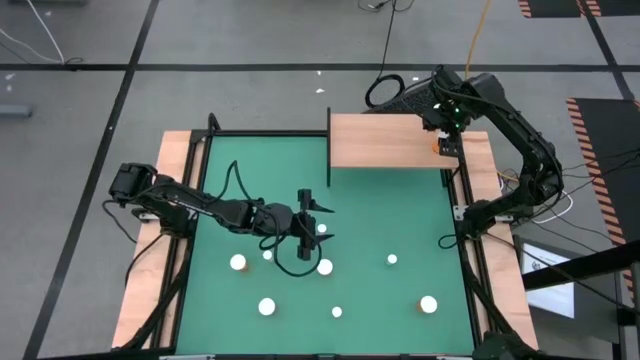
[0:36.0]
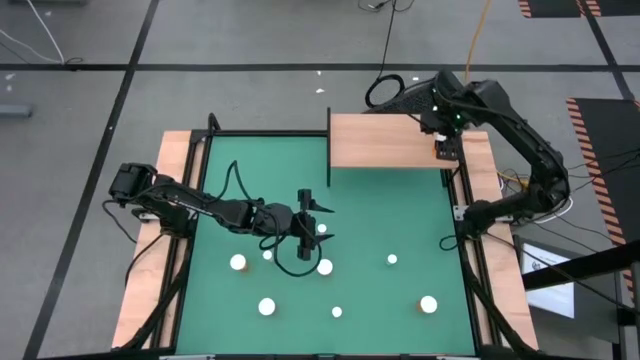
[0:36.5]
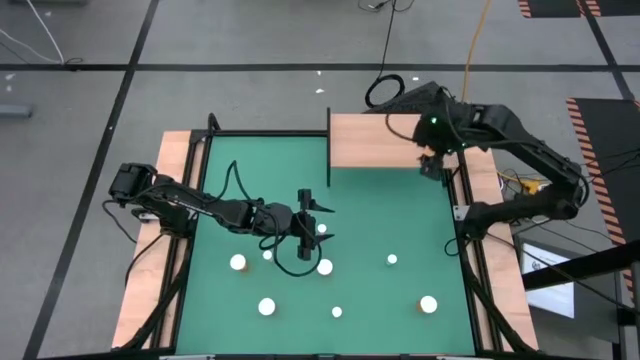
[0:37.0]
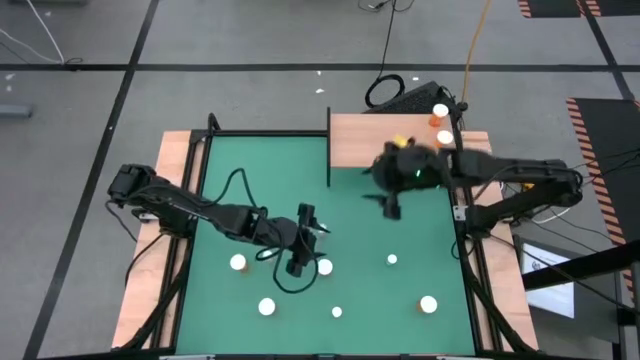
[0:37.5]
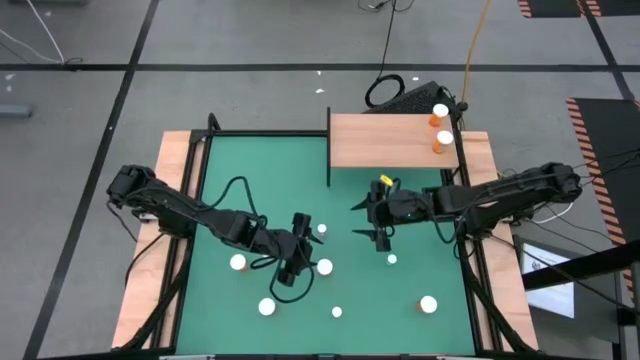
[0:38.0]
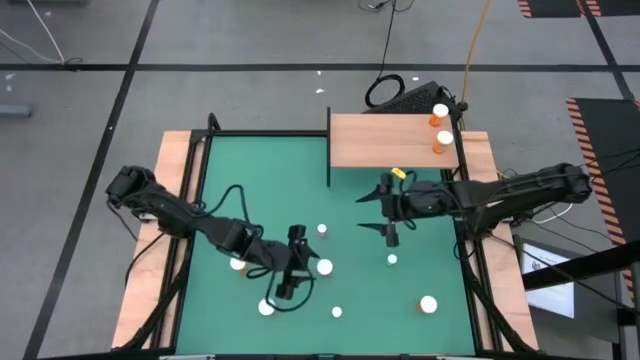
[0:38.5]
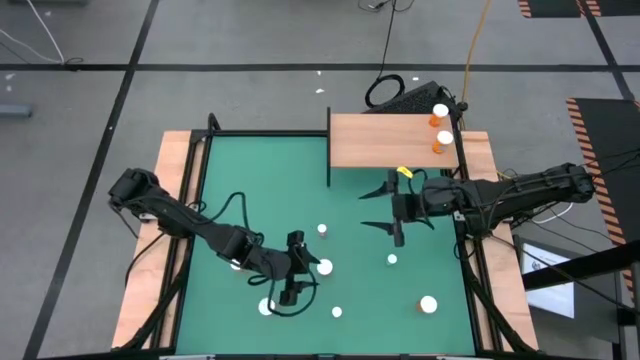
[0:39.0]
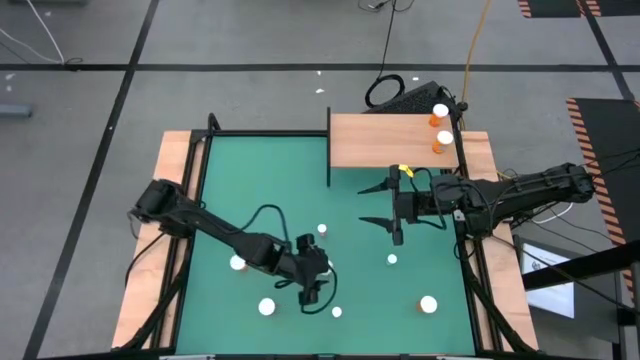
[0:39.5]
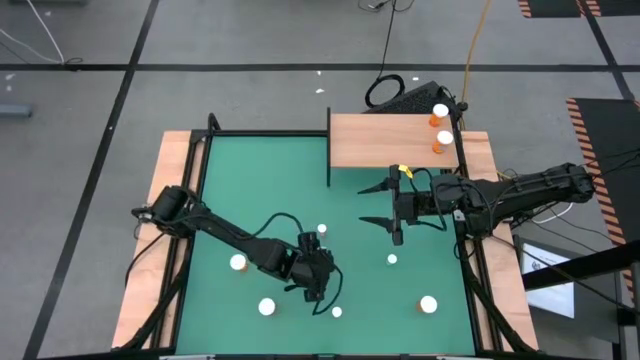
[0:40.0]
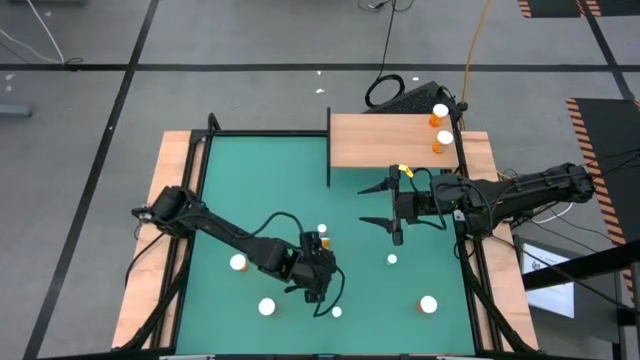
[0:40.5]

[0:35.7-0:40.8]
Task: Pick and place medicine bottles onto shelf by color
Put the orange pill bottle on the shelf

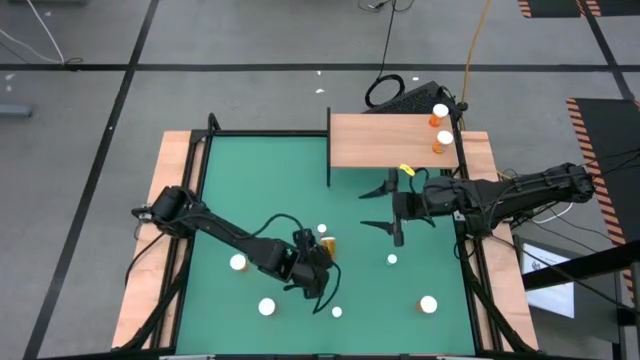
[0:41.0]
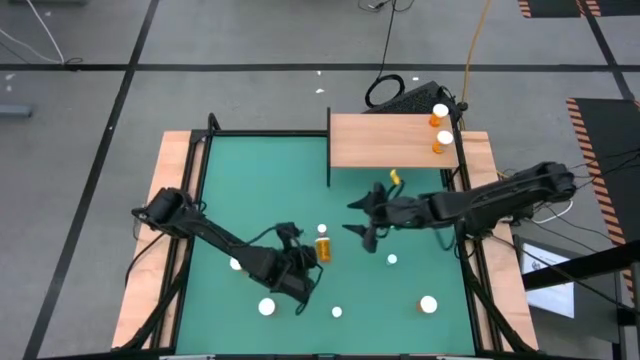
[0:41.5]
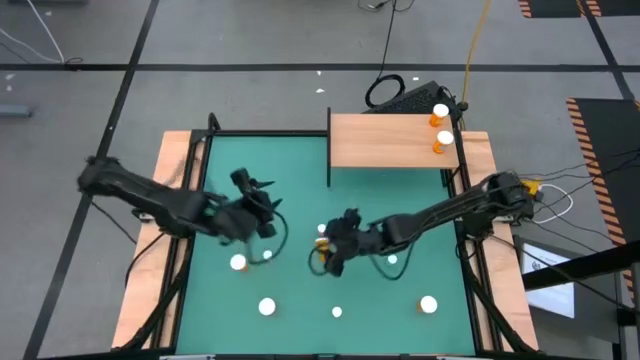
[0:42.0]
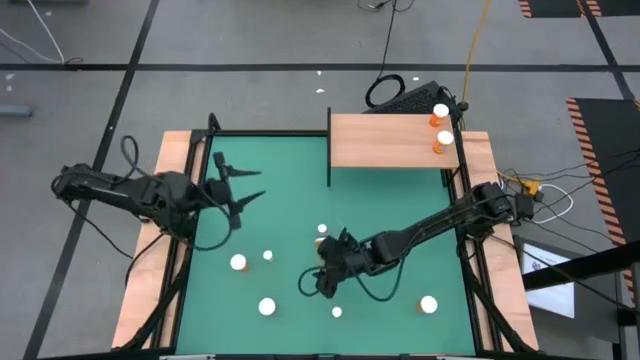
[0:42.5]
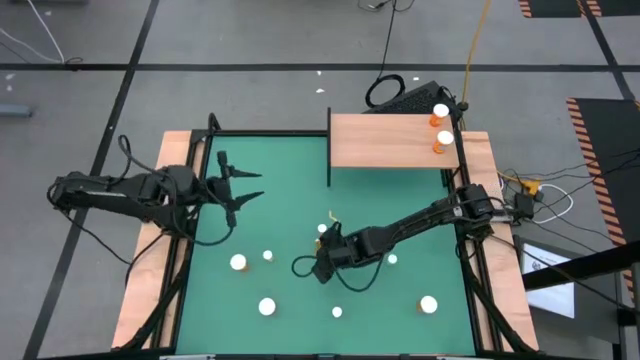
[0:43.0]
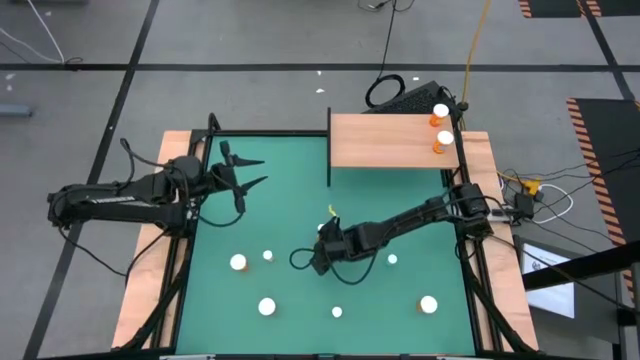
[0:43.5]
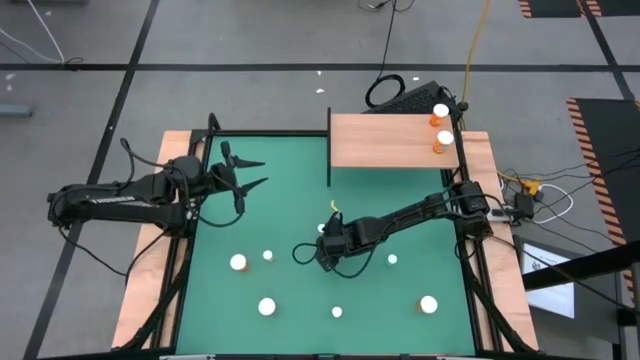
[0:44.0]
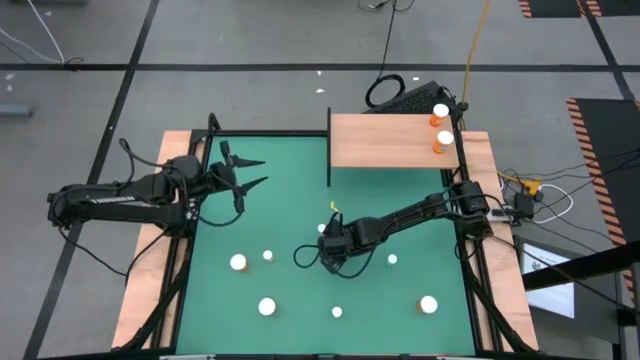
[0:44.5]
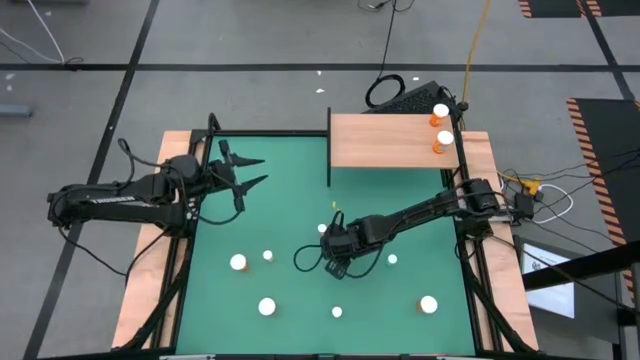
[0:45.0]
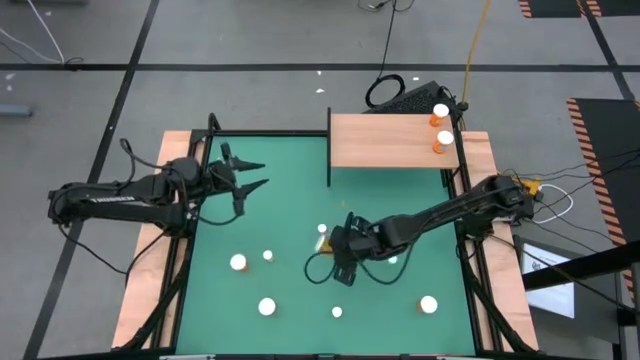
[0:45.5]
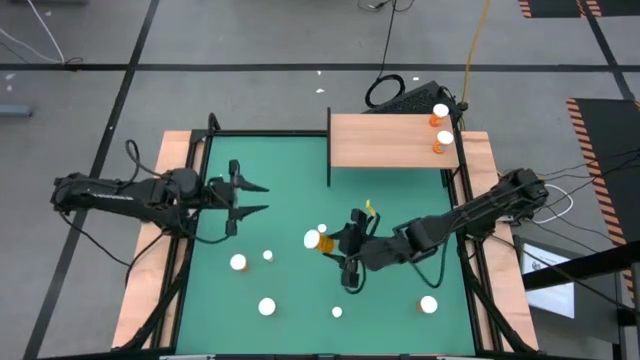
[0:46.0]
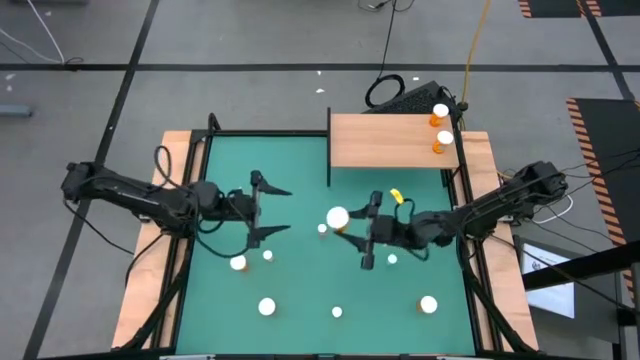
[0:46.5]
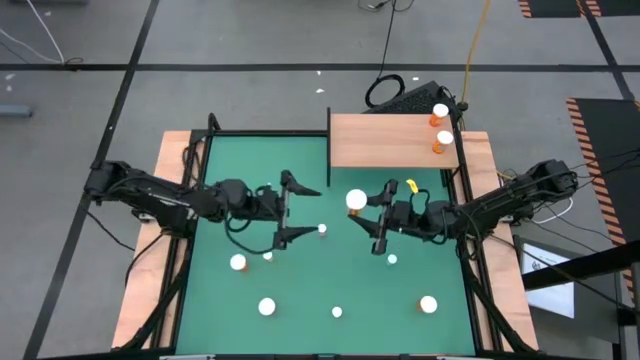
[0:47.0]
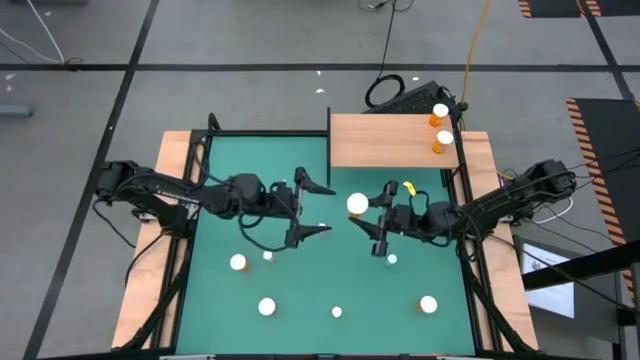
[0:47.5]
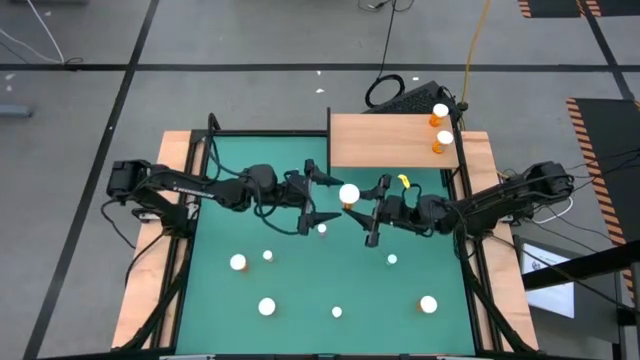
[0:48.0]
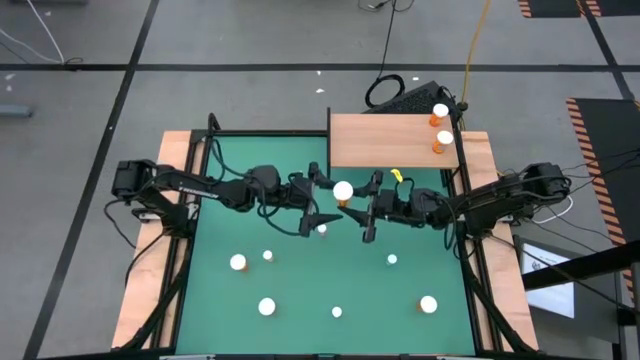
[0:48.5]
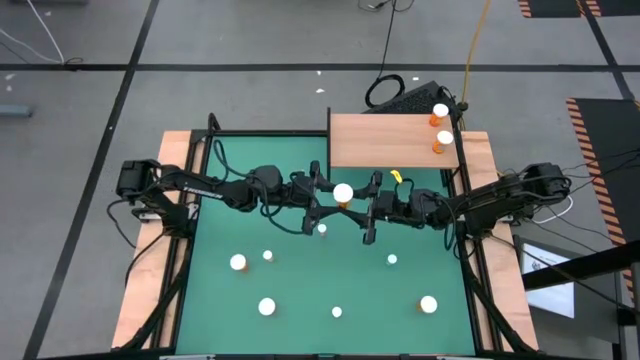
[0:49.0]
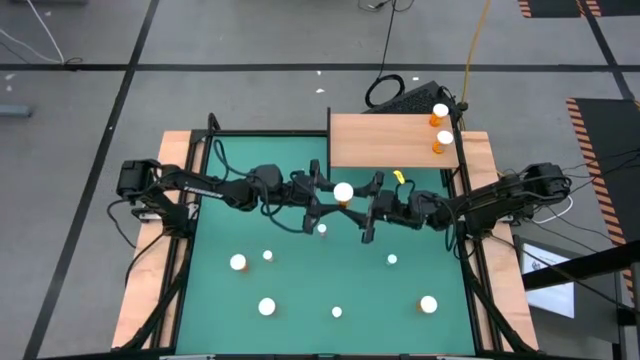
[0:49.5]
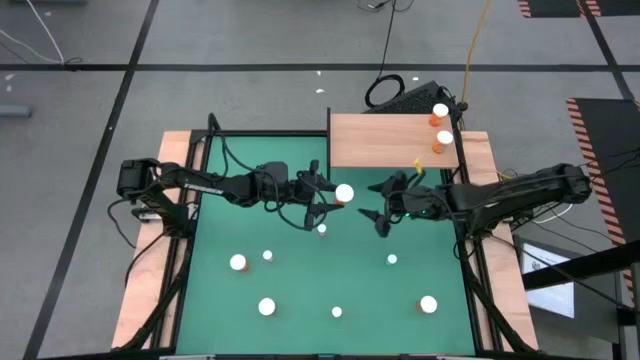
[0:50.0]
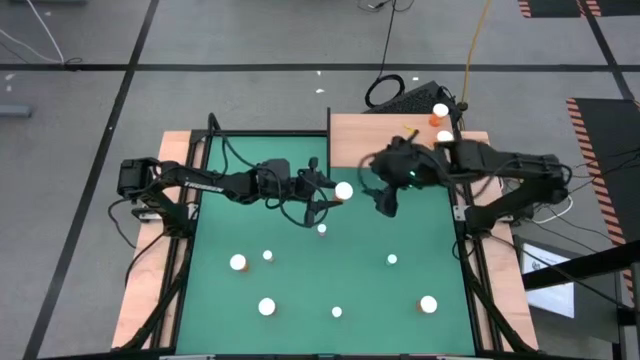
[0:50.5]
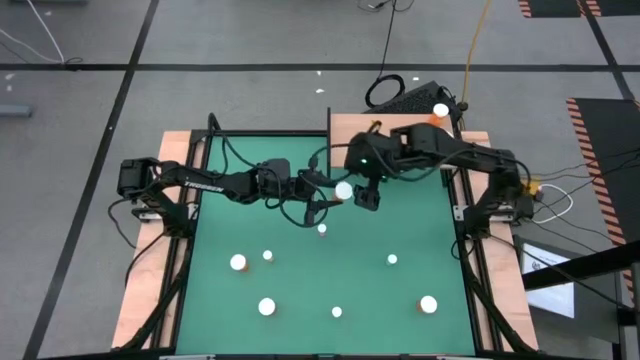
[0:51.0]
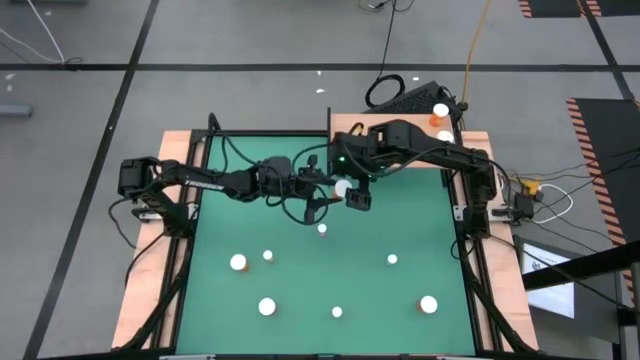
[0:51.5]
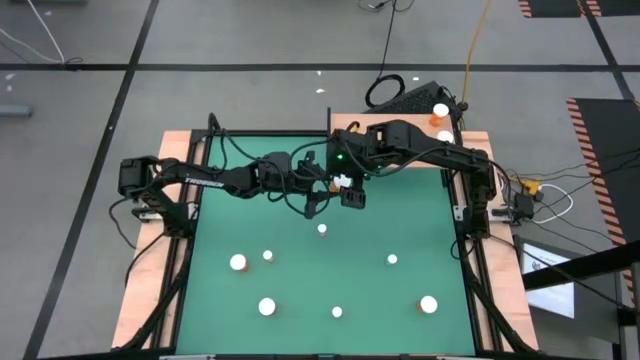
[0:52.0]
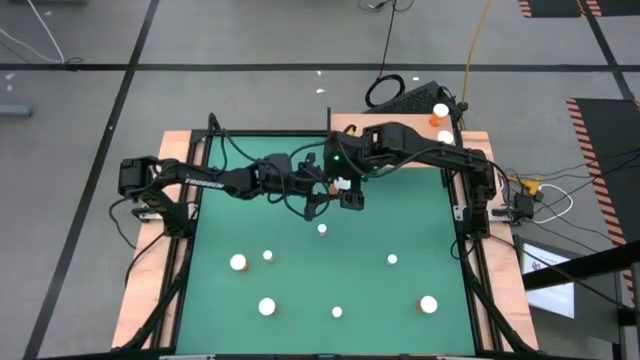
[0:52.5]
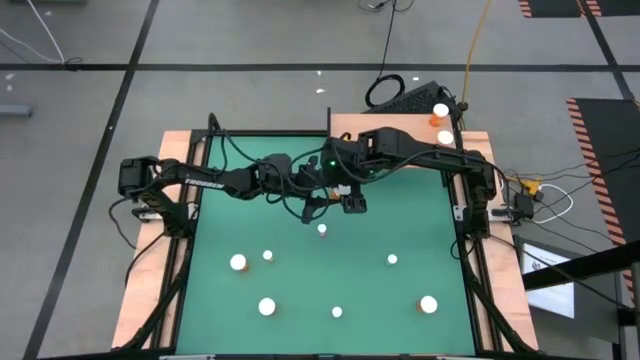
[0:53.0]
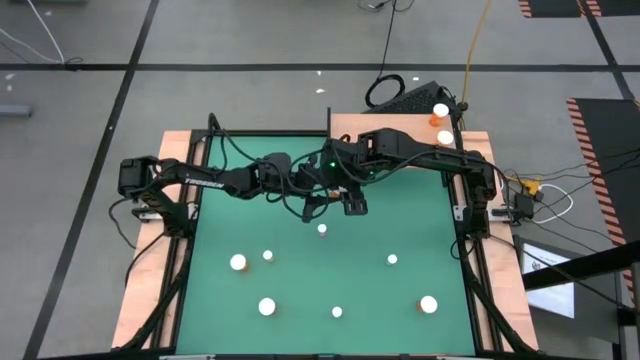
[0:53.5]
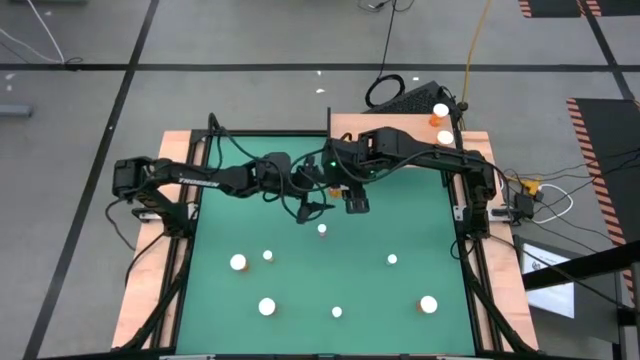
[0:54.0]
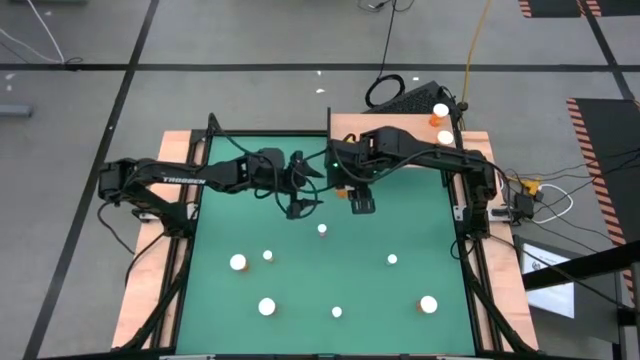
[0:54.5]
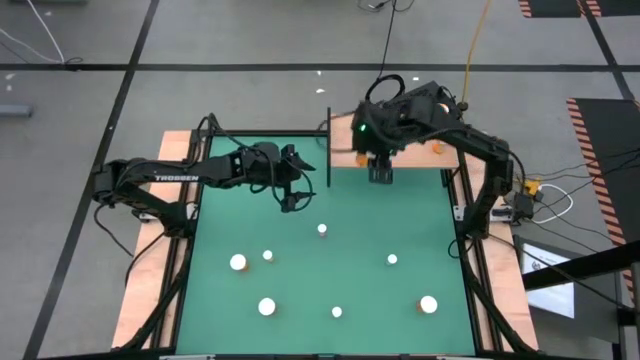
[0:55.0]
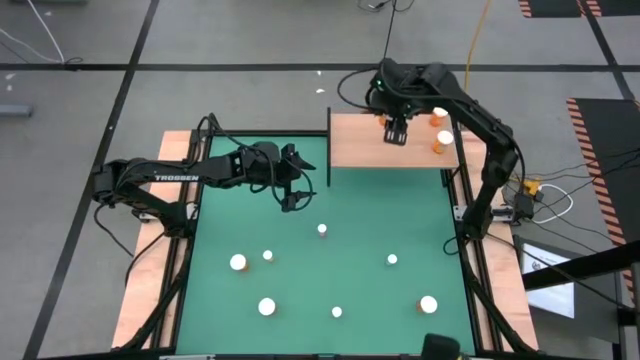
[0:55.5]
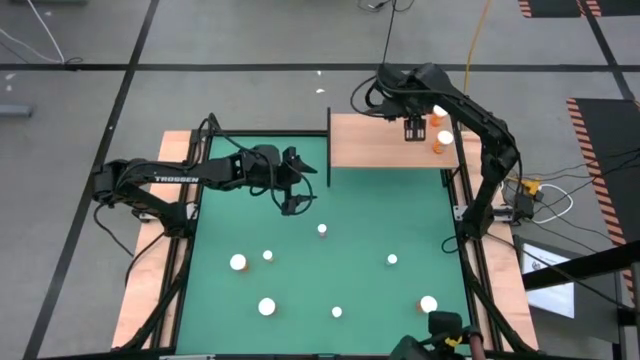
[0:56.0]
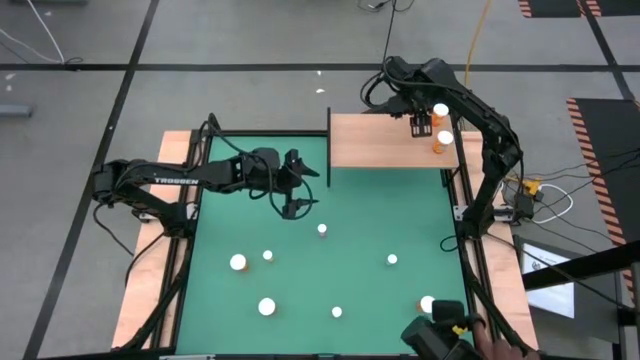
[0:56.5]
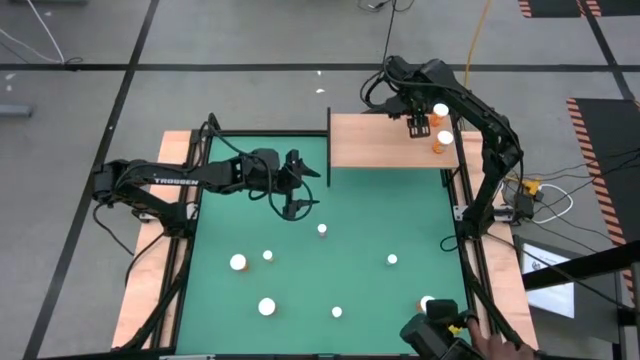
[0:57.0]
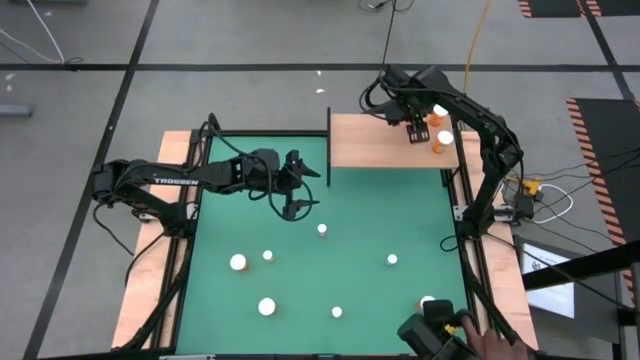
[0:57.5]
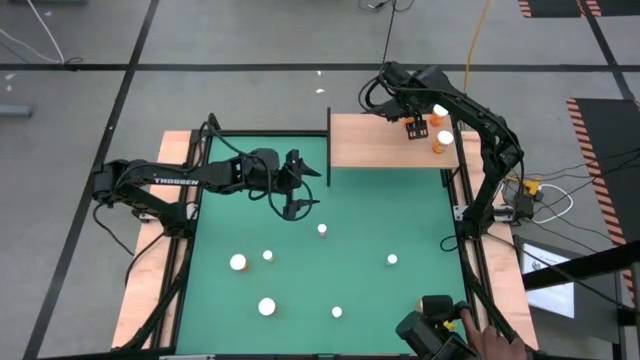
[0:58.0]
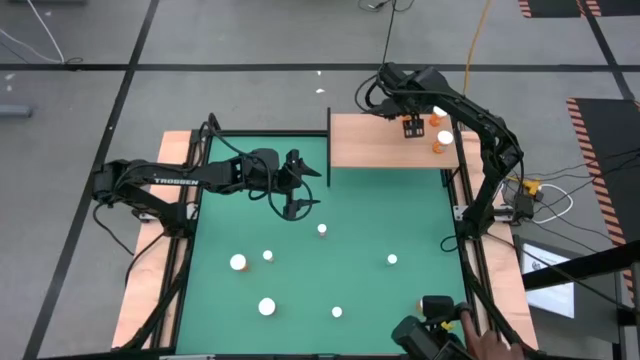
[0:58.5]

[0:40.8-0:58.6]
Put the orange pill bottle on the shelf
